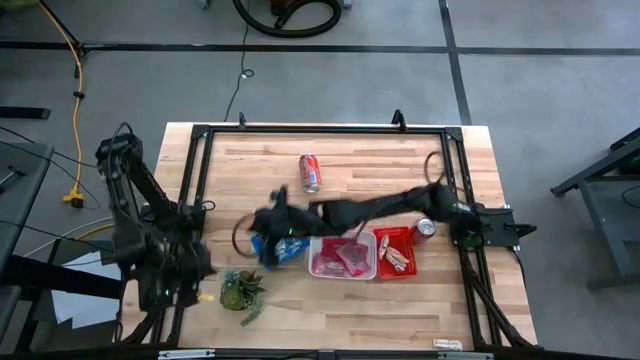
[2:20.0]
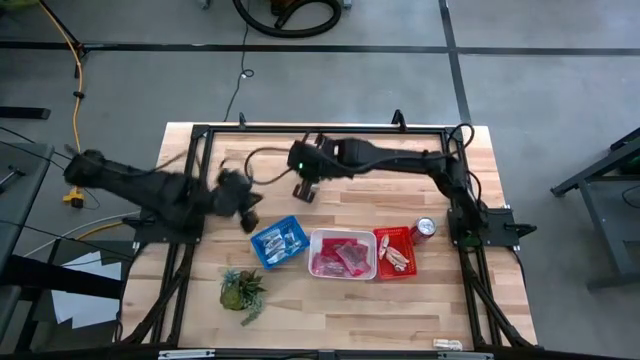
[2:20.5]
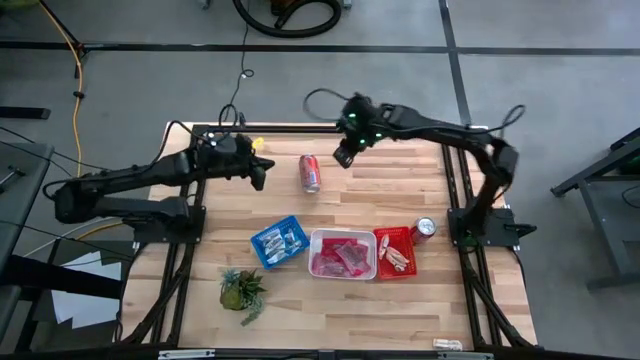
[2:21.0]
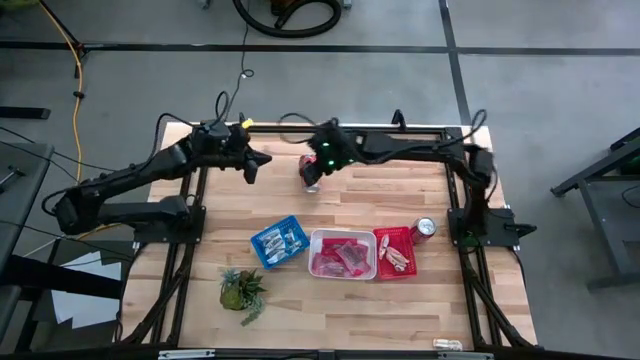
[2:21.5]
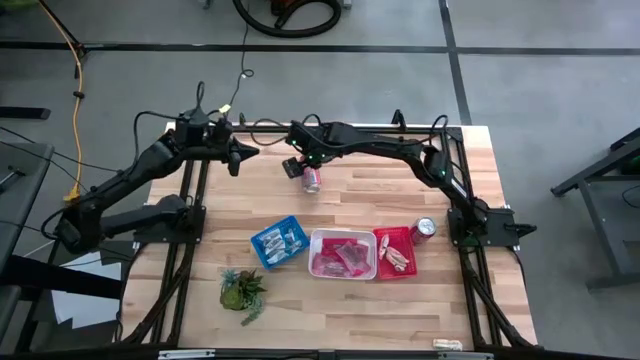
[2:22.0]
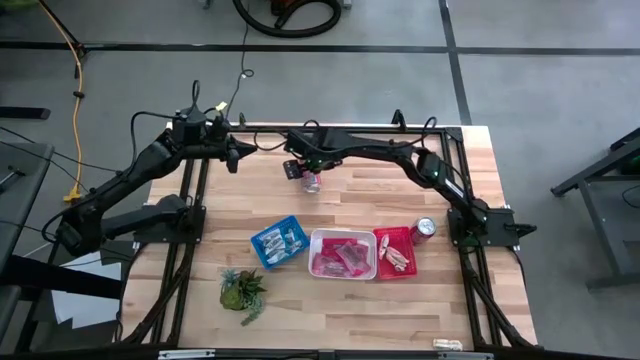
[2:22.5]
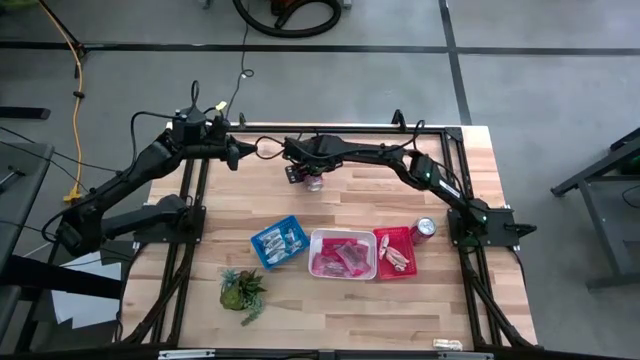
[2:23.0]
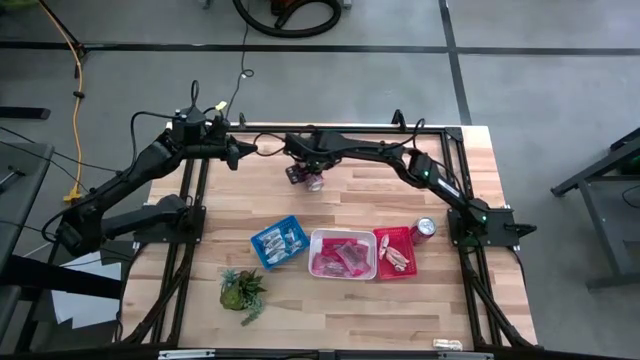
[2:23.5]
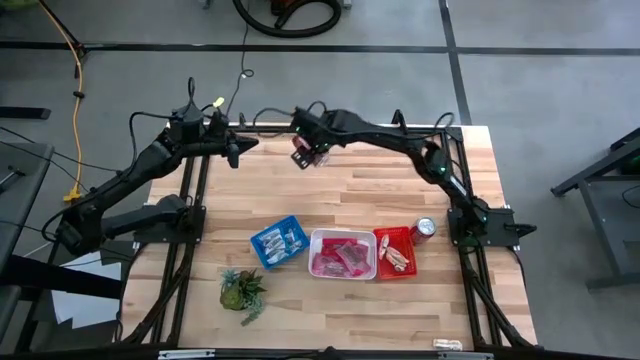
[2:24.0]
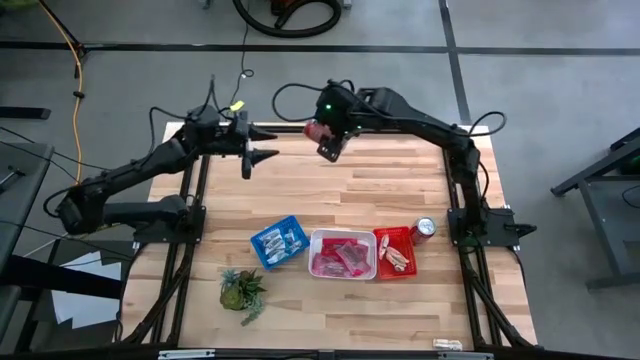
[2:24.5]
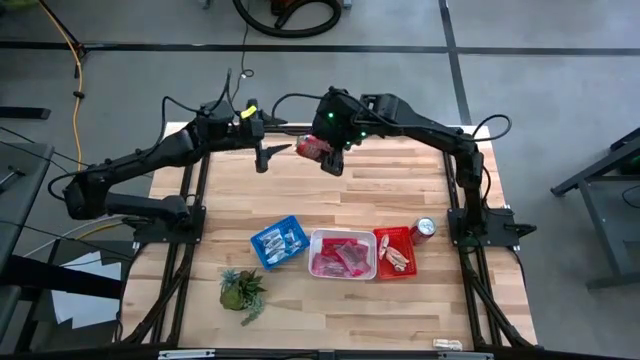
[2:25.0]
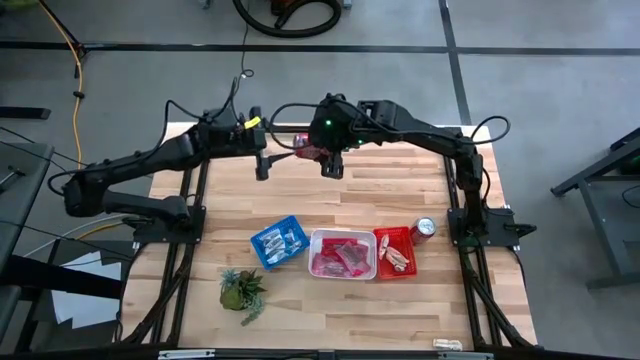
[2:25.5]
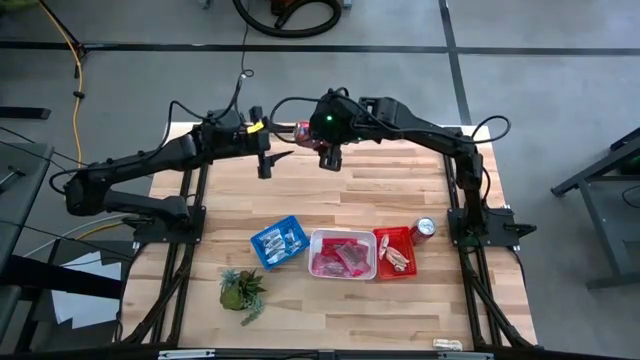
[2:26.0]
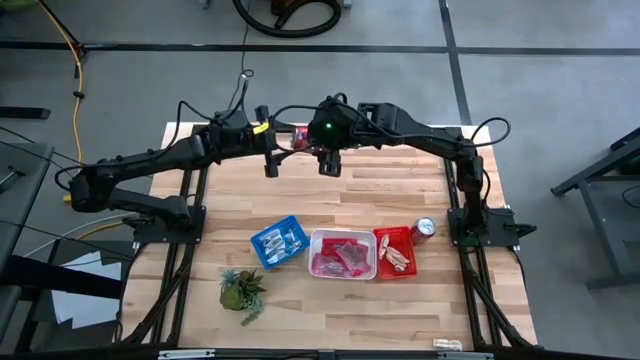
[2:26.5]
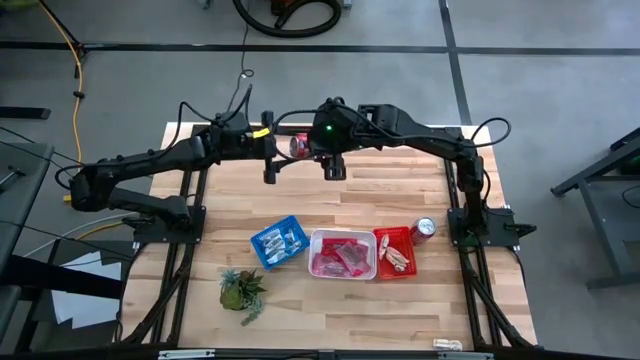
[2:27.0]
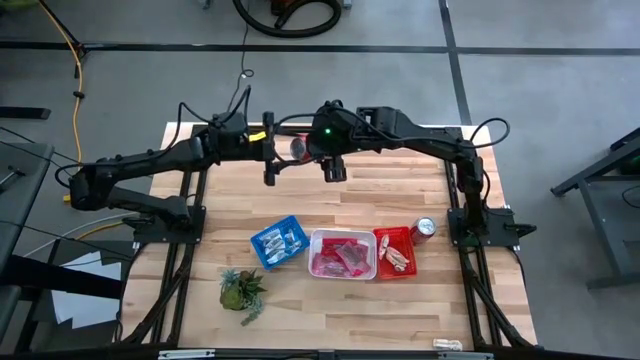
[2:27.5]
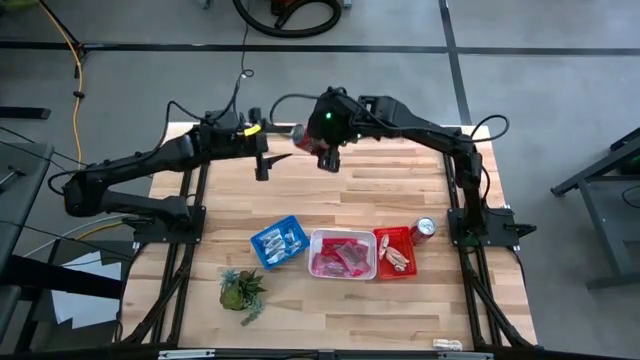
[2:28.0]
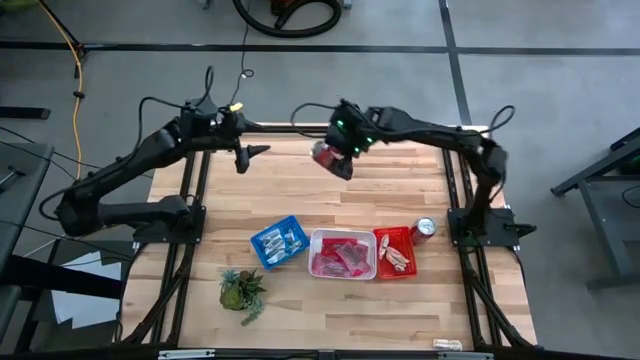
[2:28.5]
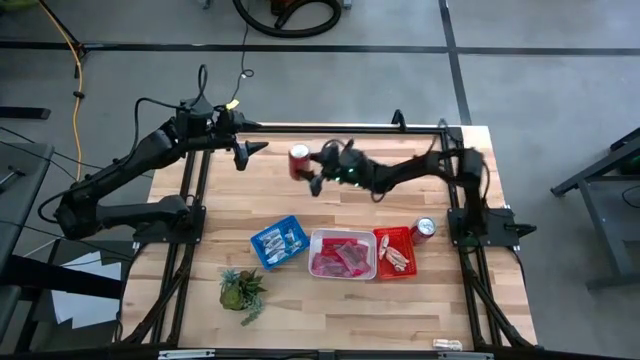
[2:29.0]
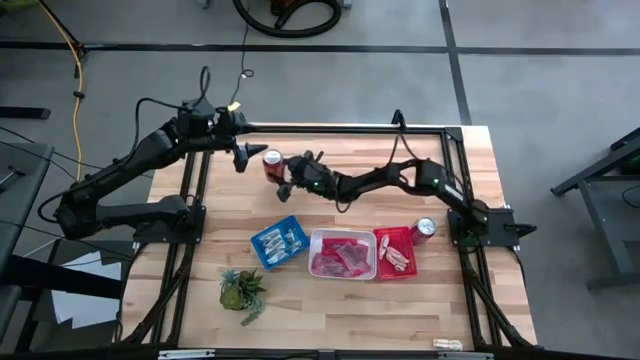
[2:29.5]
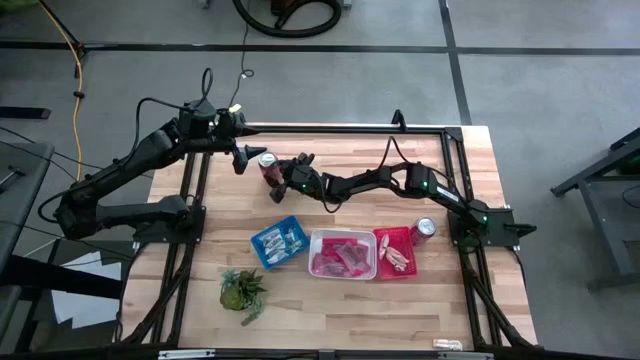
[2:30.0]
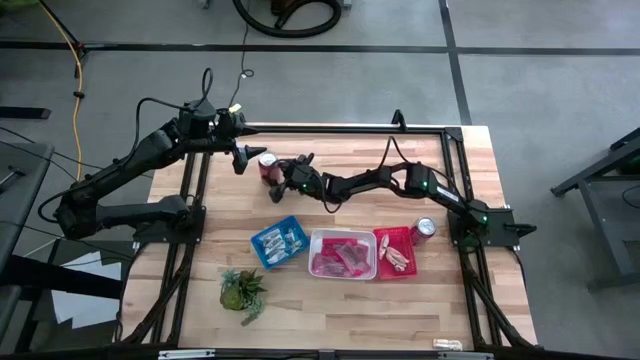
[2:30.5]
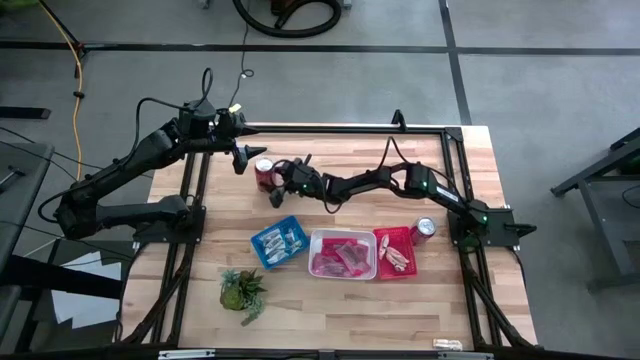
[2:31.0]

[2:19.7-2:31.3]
Task: Sort candy
Adjust the orange soda can on the table

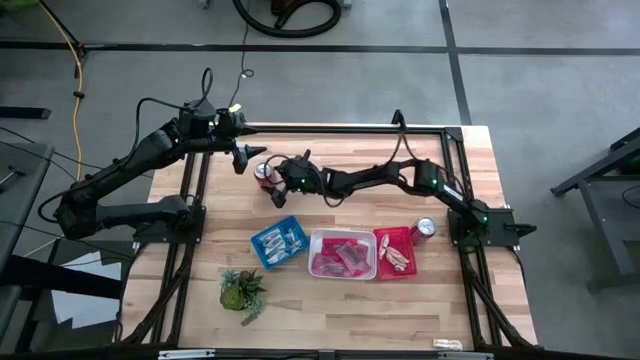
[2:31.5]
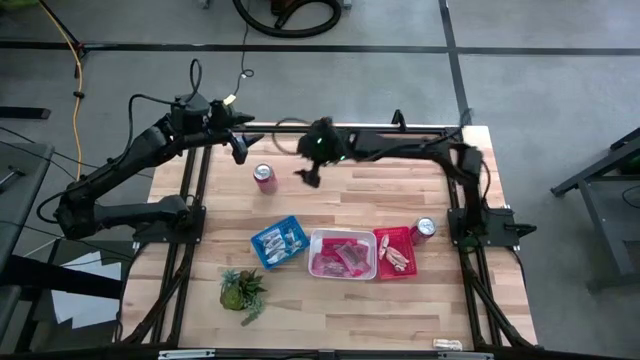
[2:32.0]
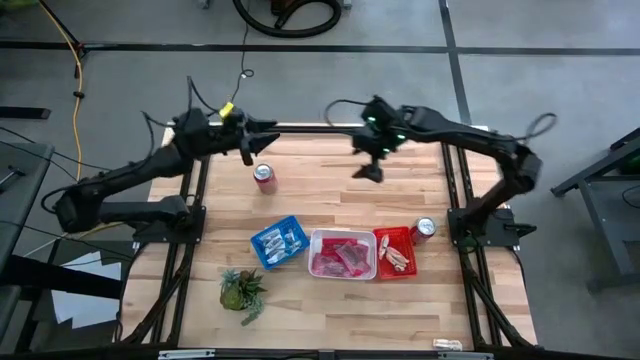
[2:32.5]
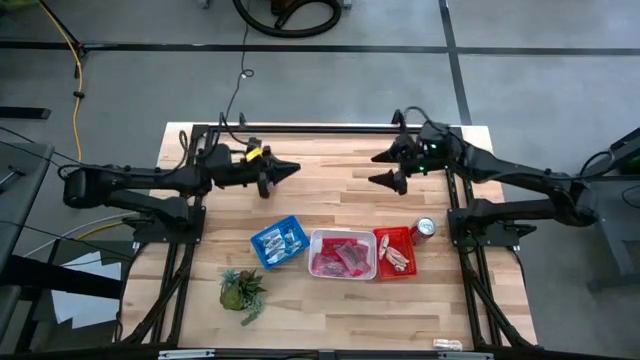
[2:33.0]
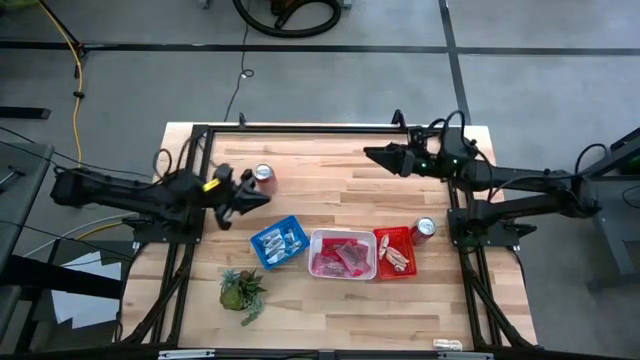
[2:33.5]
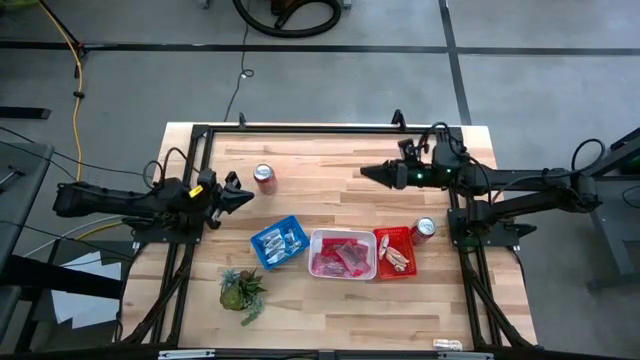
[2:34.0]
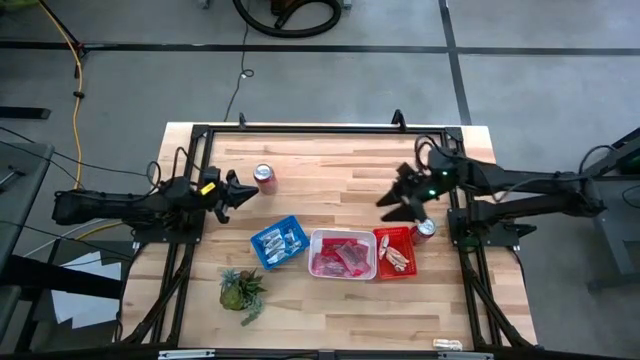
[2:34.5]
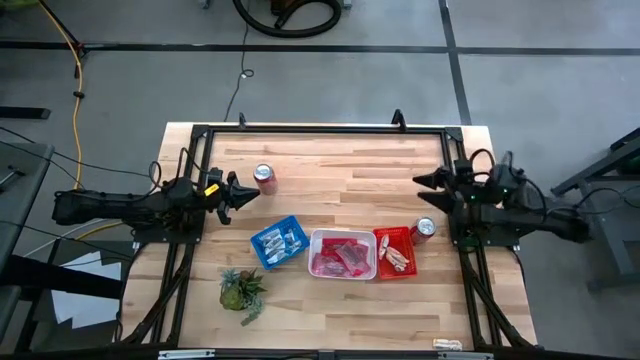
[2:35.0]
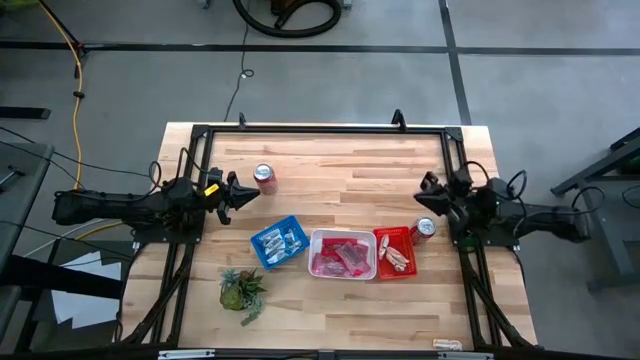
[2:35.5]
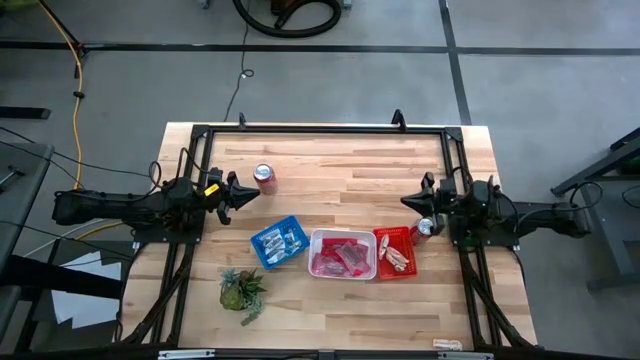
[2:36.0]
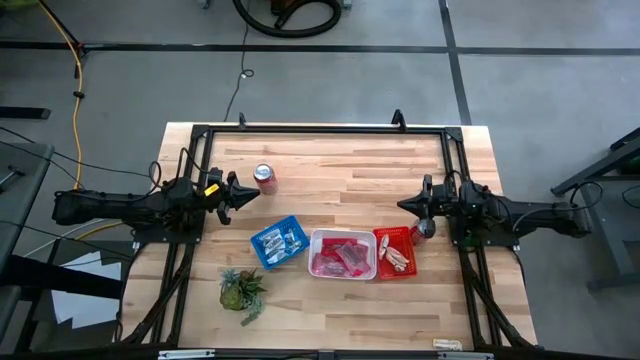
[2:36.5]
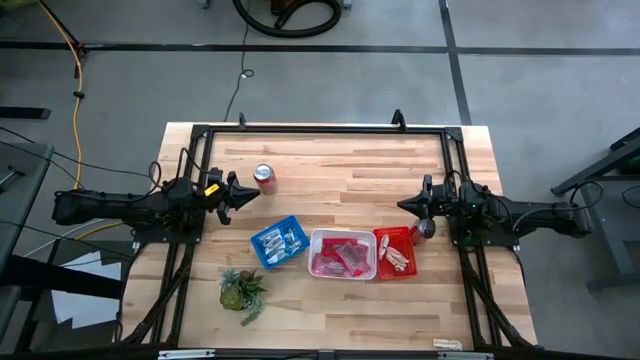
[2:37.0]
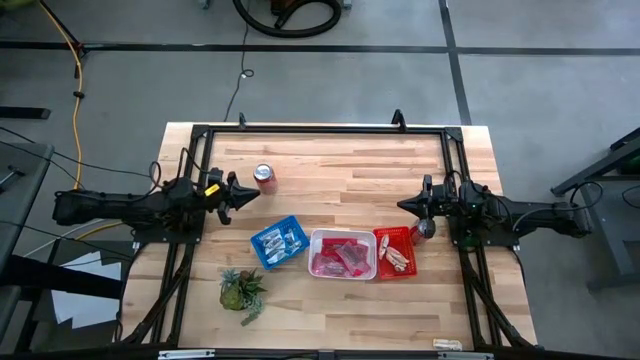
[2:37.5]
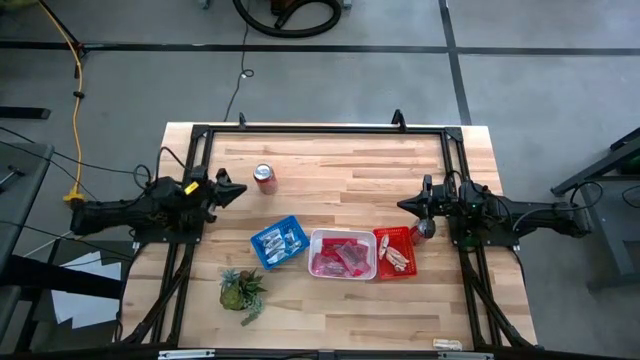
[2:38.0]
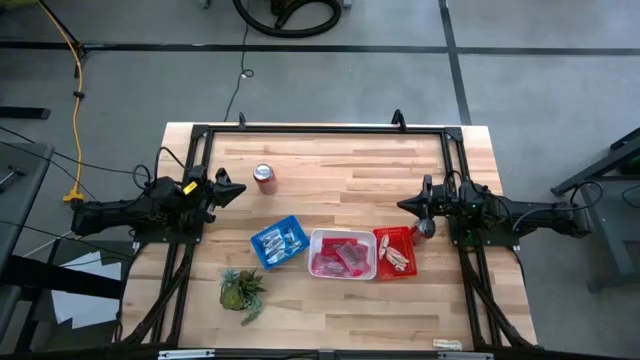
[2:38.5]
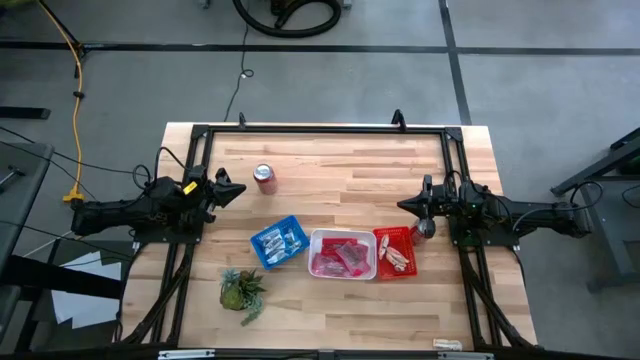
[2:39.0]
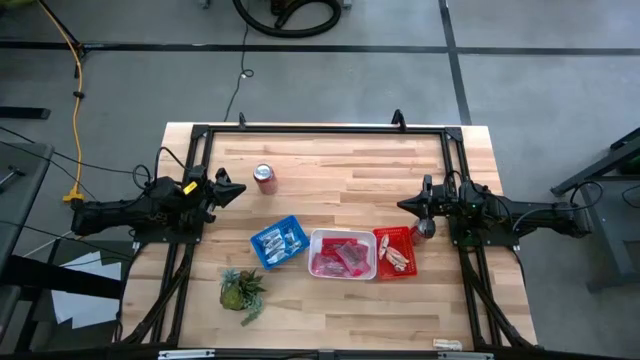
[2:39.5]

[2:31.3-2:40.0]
Return to Home Position

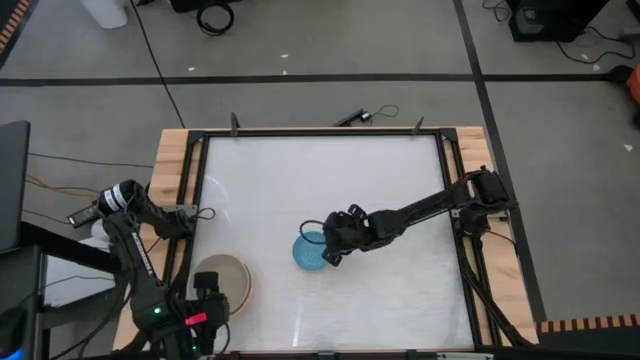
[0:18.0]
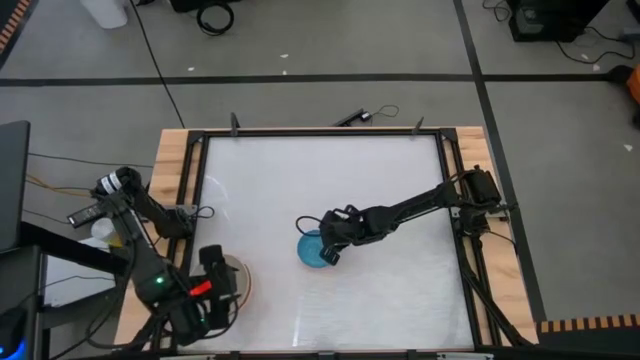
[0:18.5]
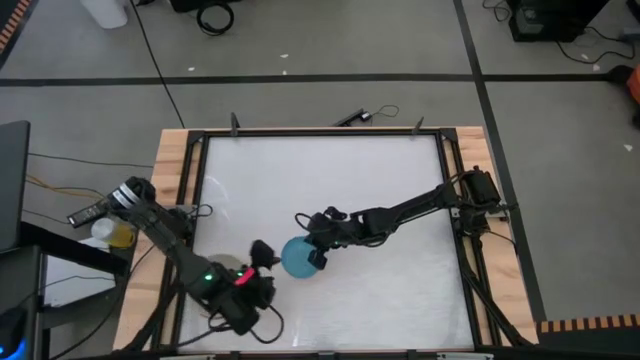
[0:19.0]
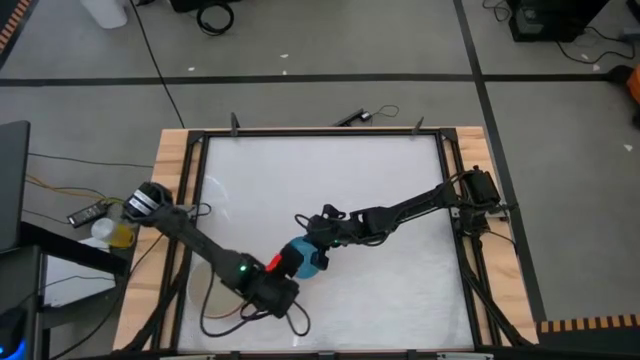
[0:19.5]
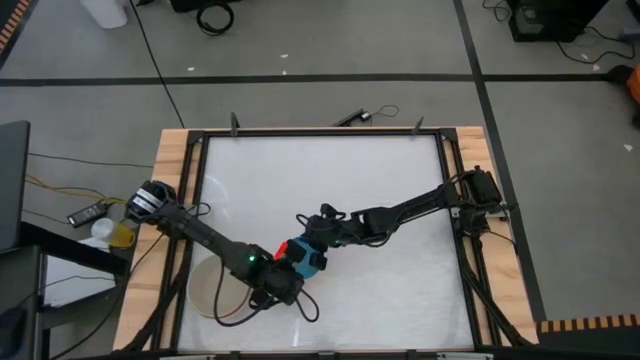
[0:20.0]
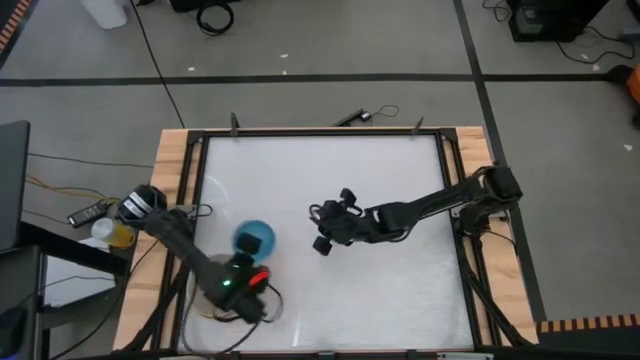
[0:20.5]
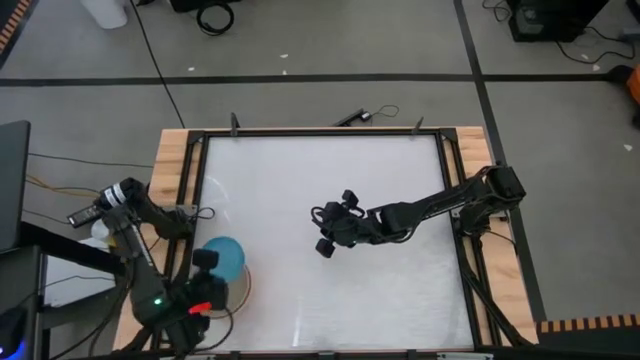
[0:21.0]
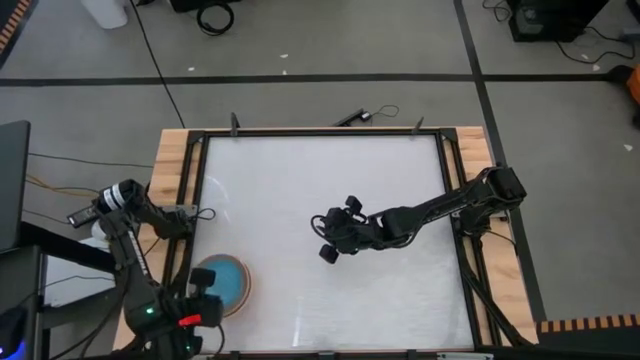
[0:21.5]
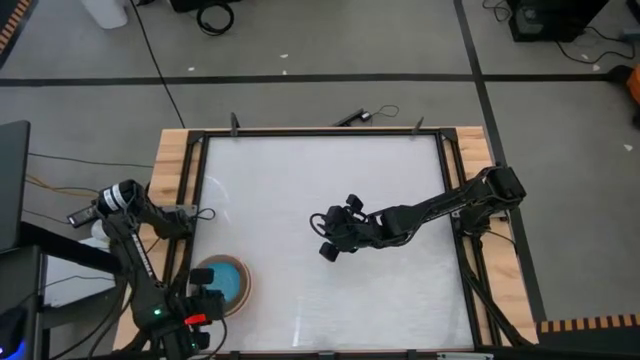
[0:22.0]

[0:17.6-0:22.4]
Task: Nest bowls inside each other by size order
Stack the blue bowl on the gray bowl
